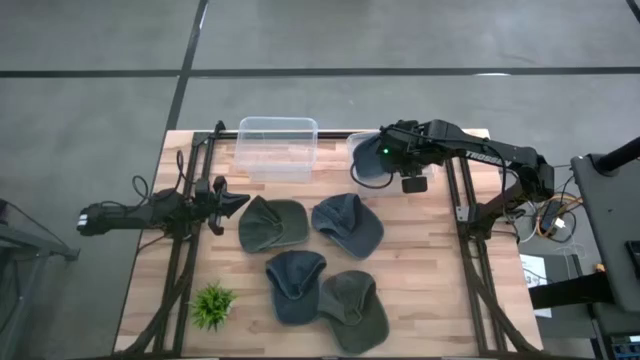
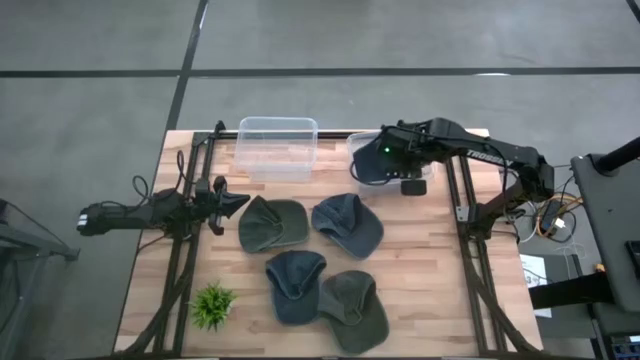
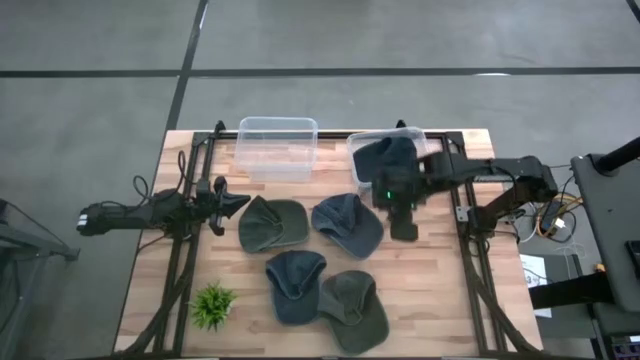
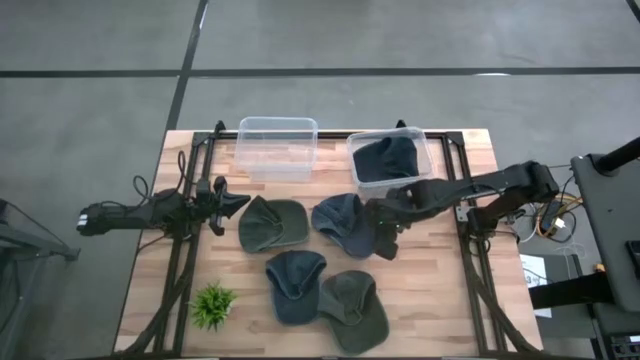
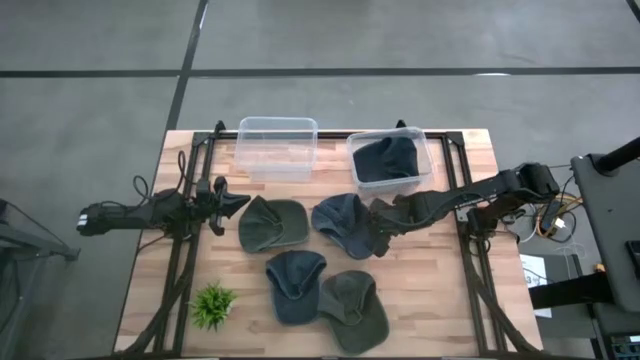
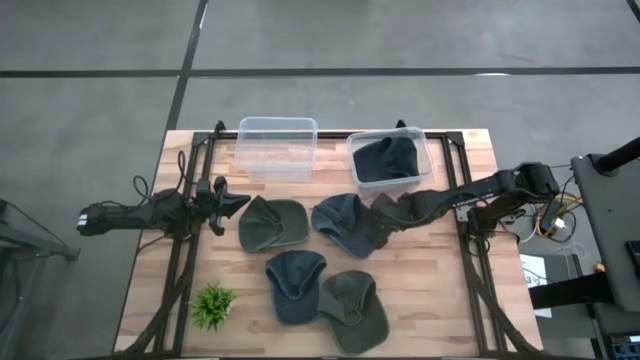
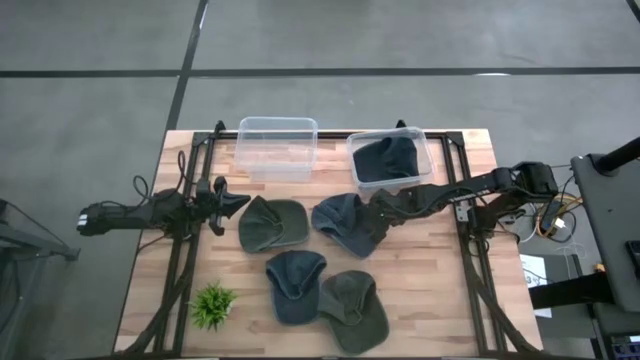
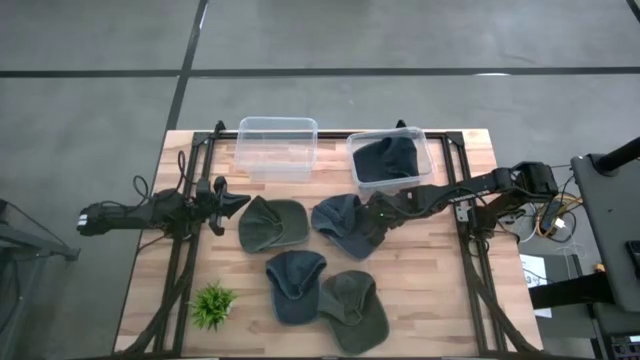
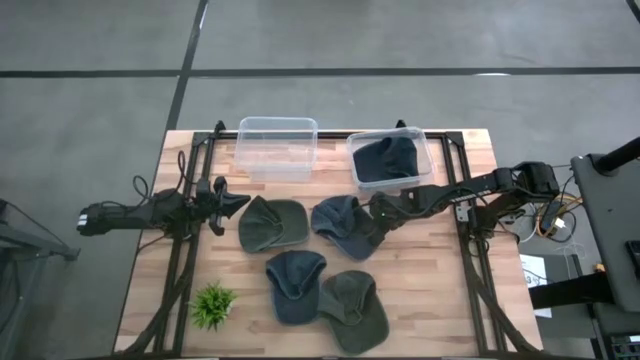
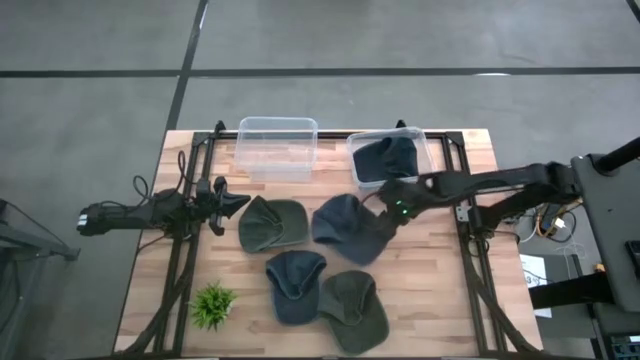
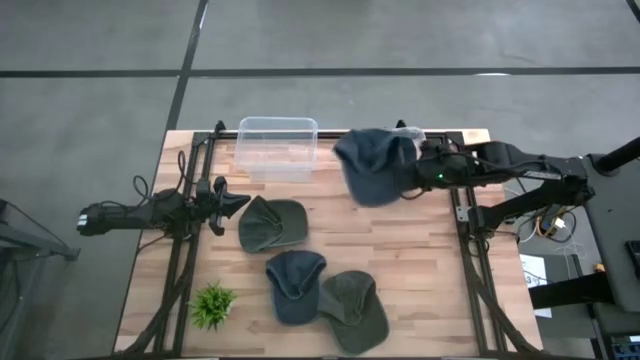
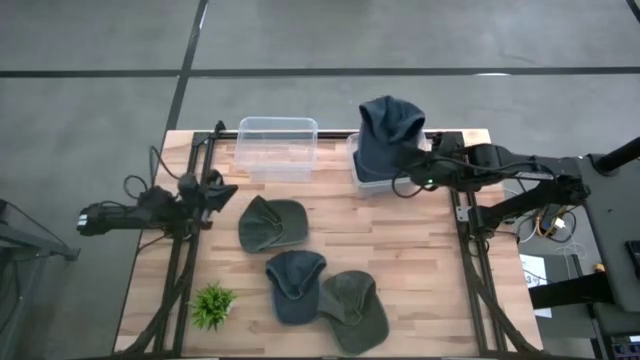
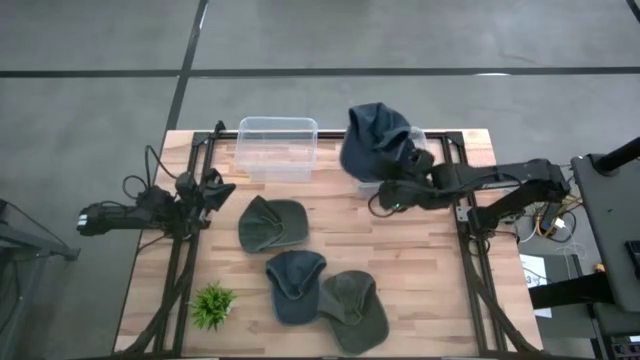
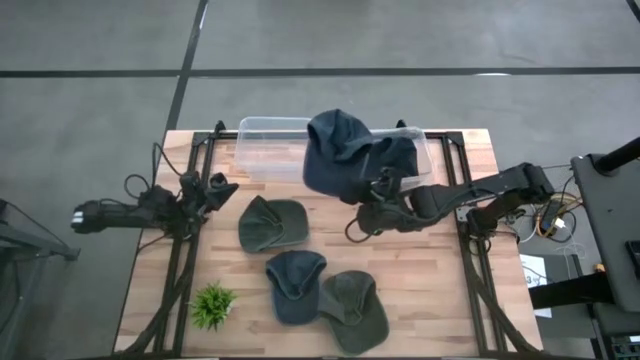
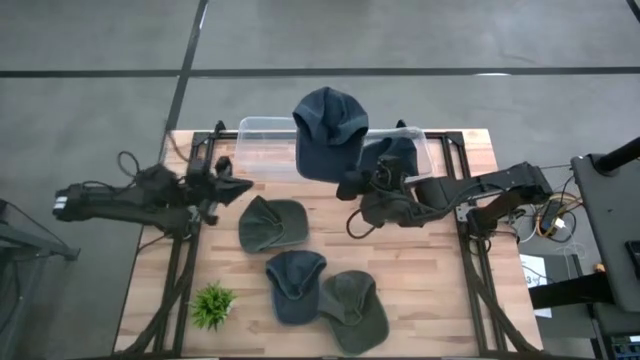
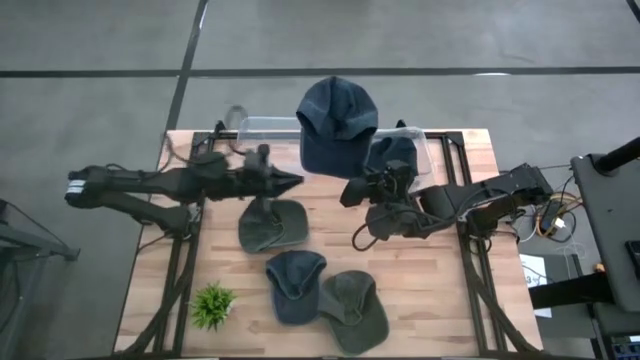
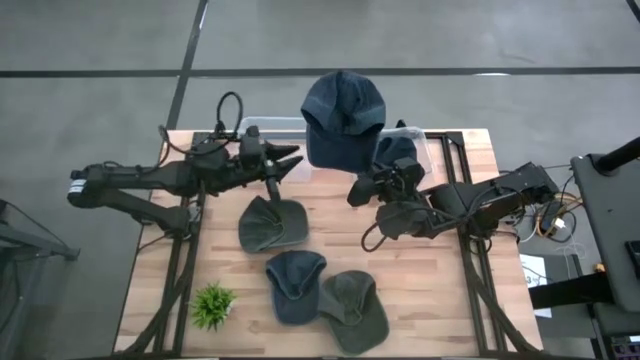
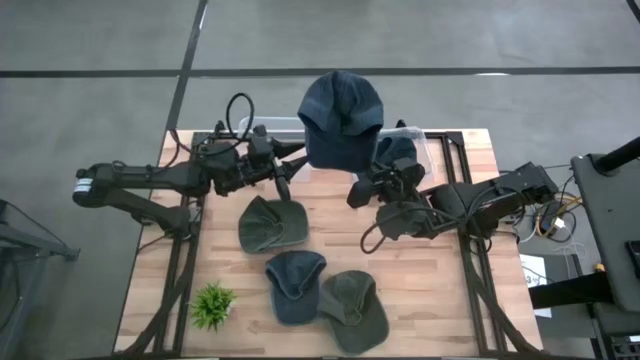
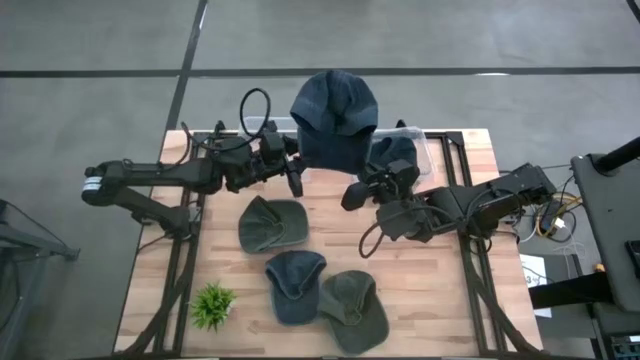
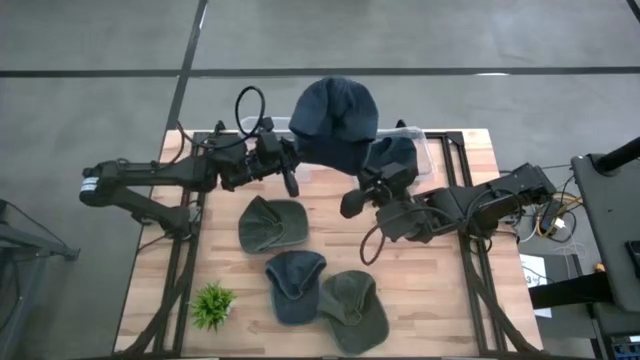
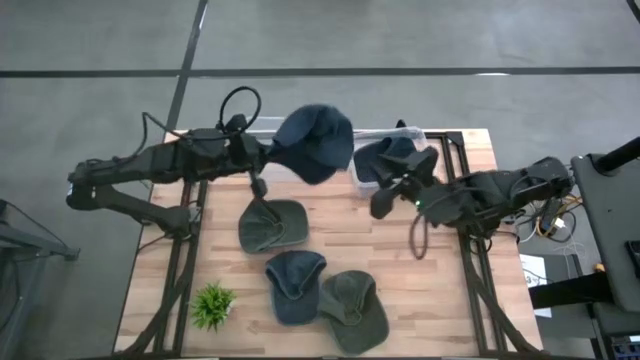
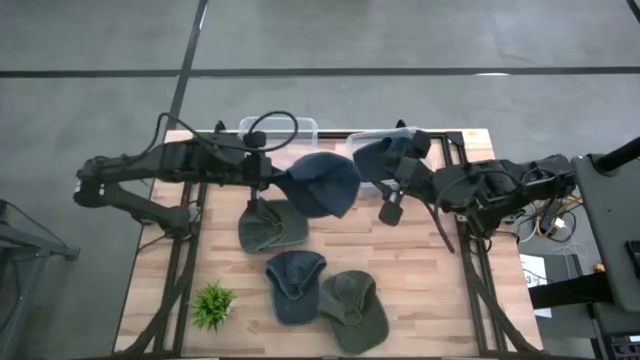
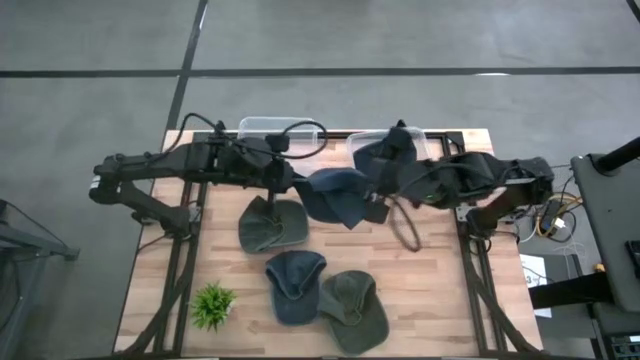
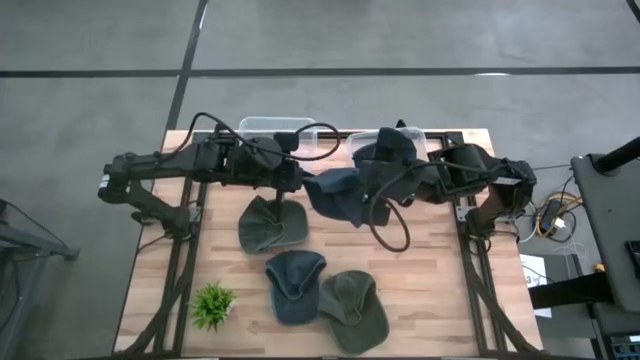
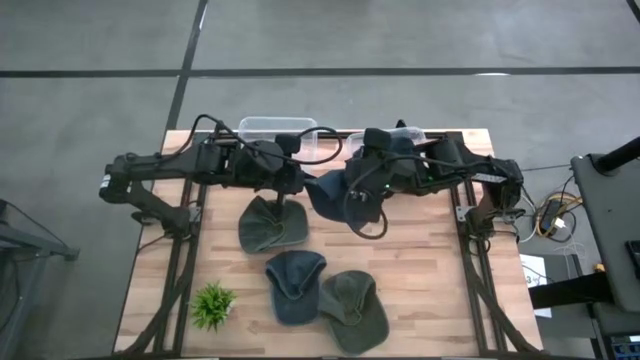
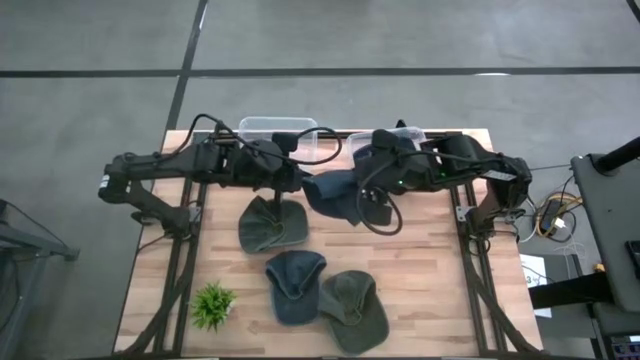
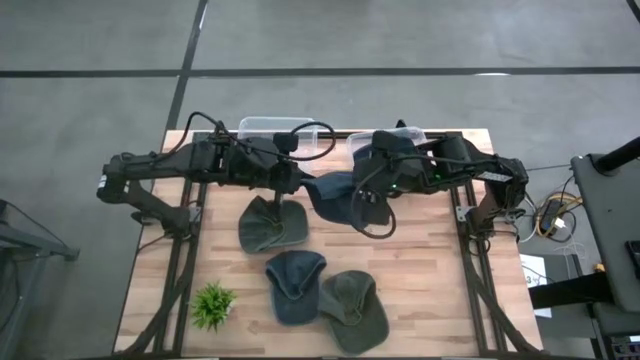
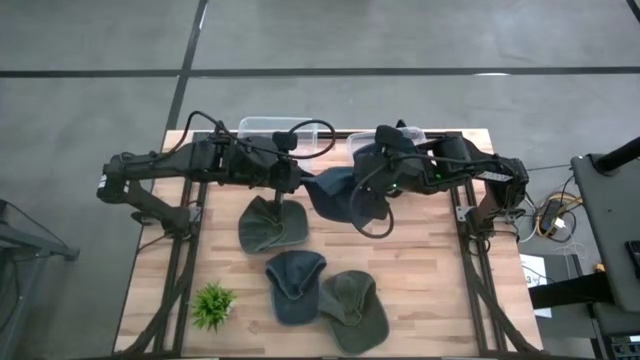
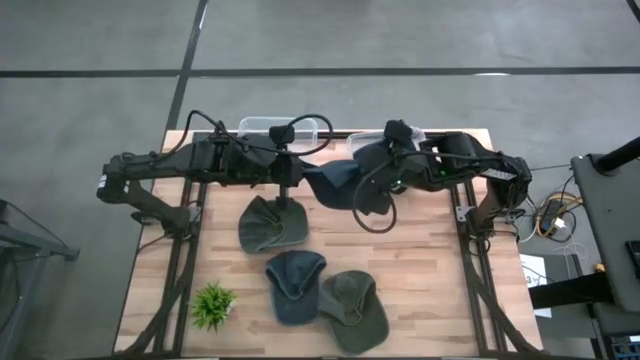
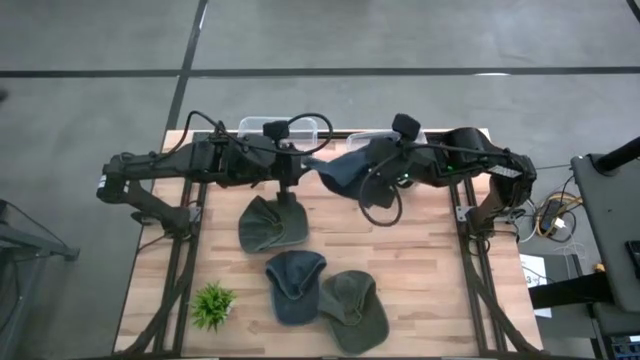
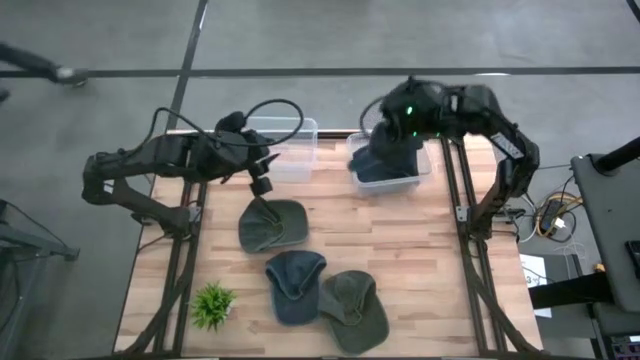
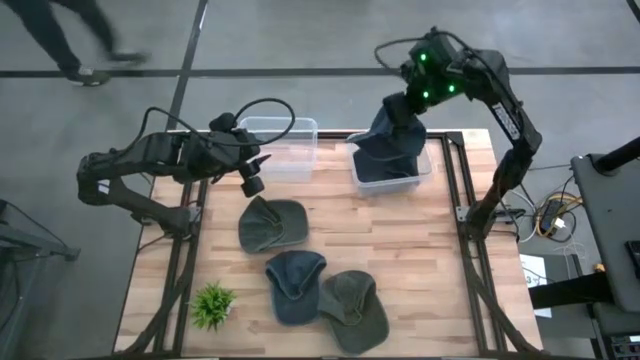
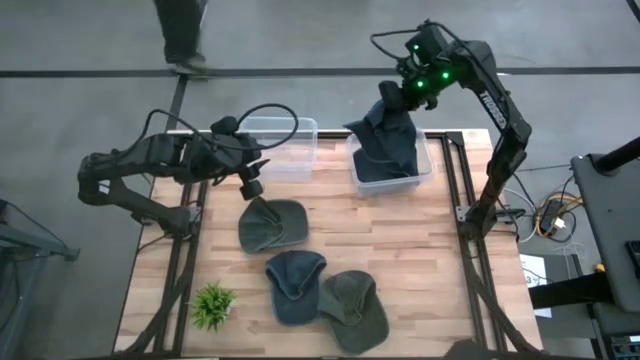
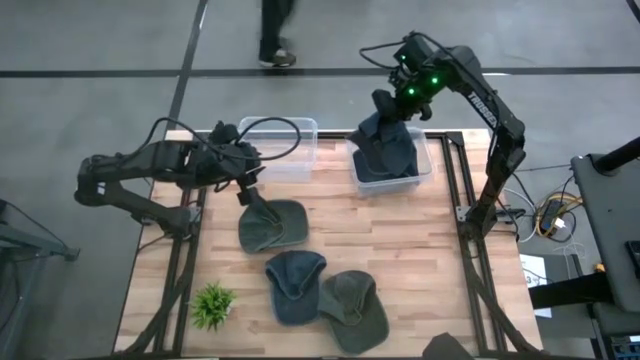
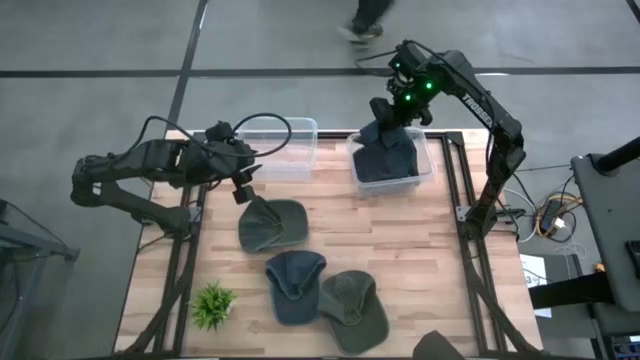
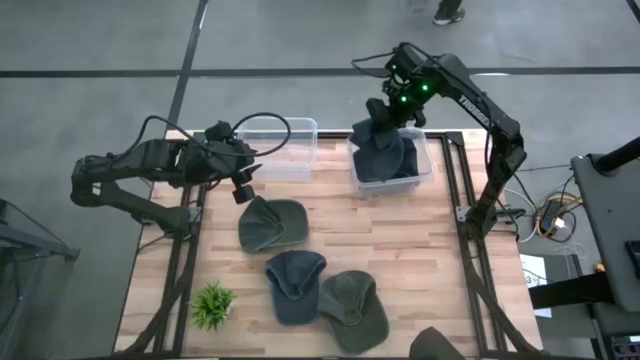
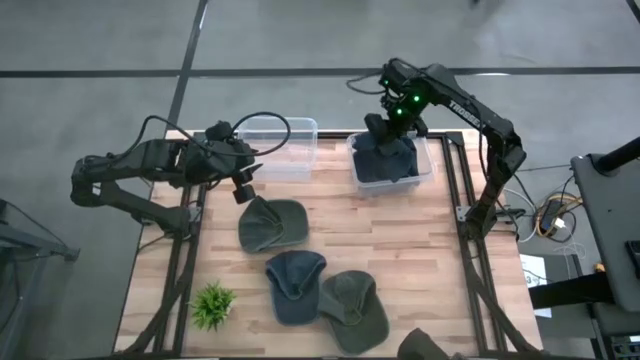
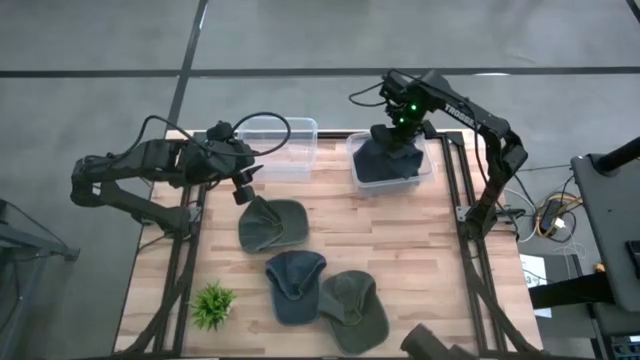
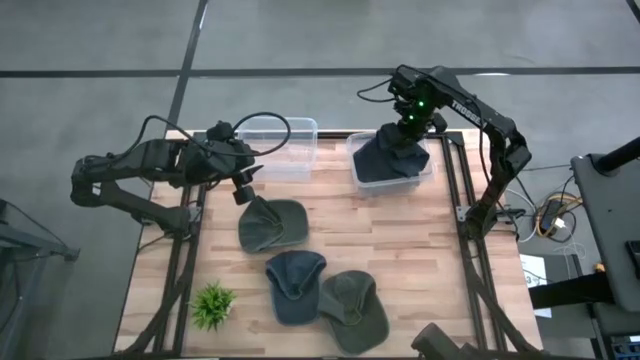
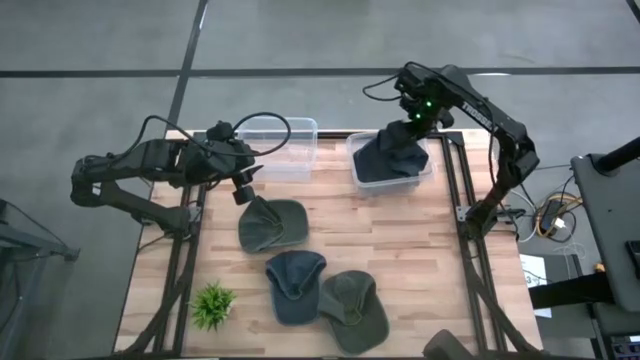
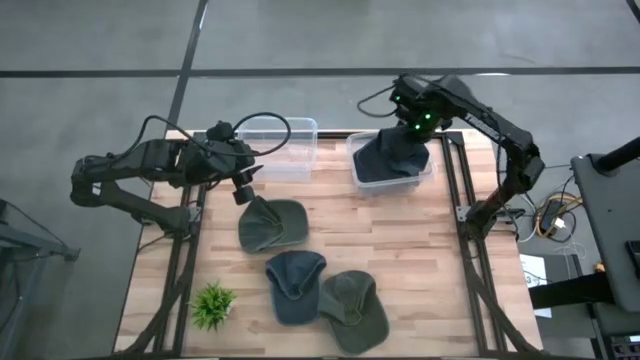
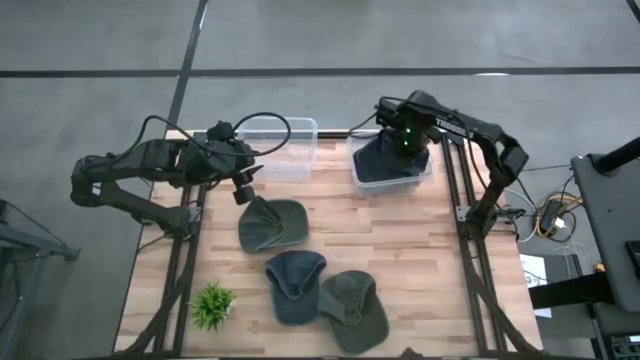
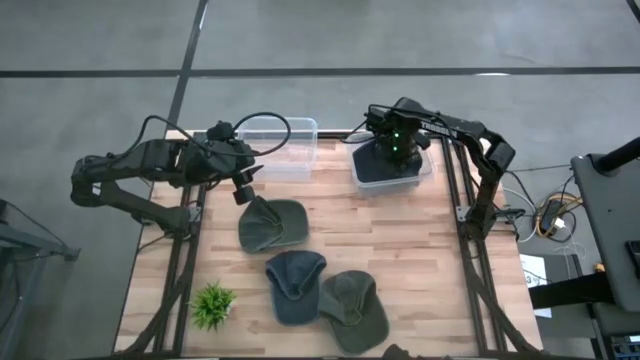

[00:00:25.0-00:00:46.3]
Task: Pick & Place hat
Put the top blue cap into the right transparent bin
